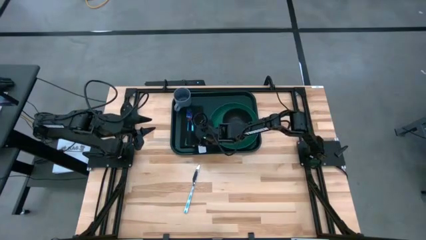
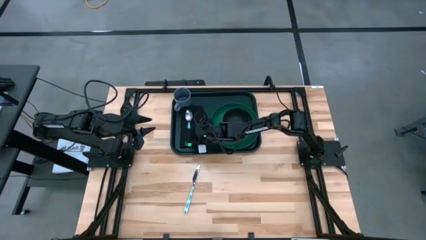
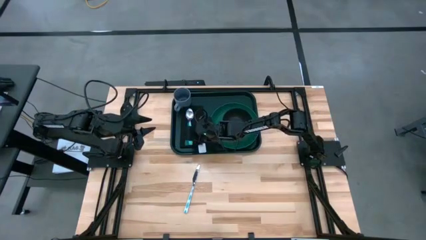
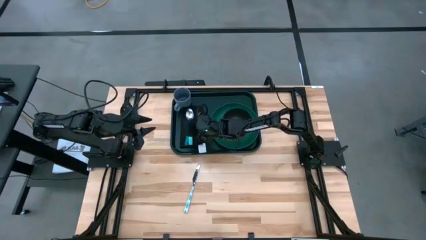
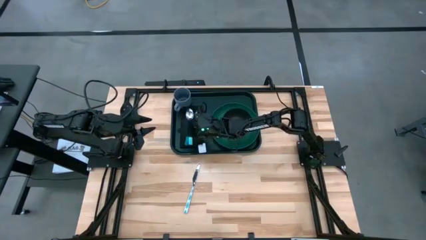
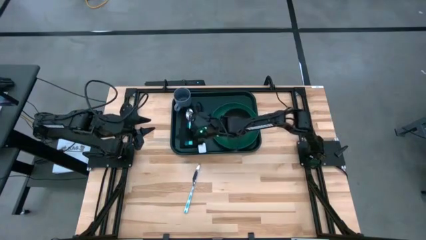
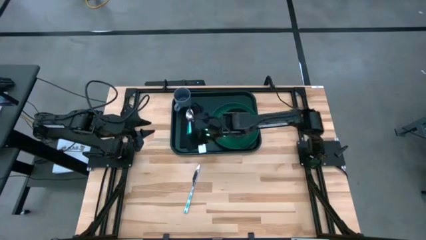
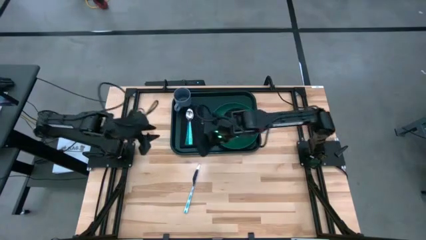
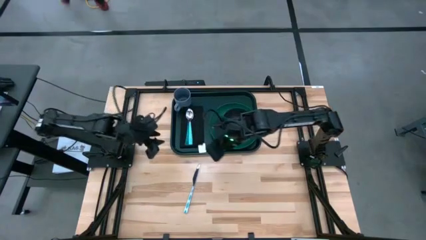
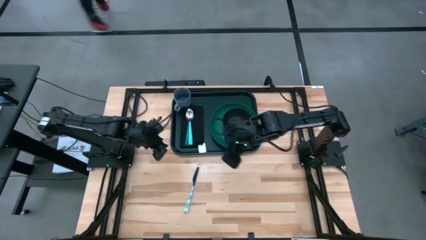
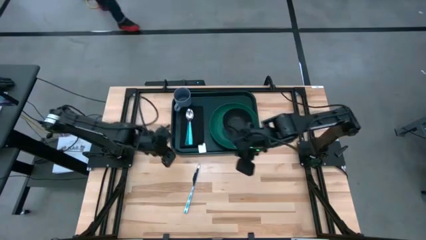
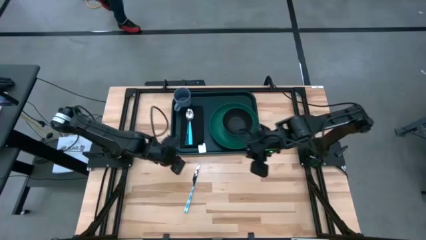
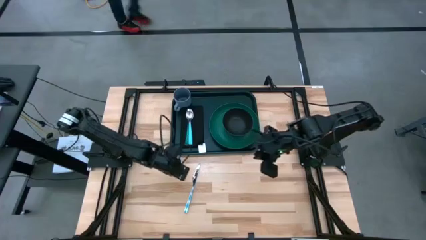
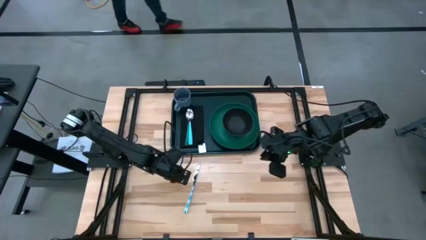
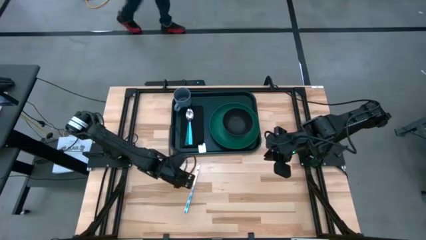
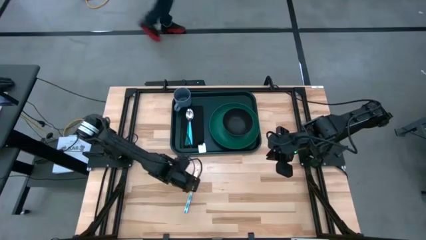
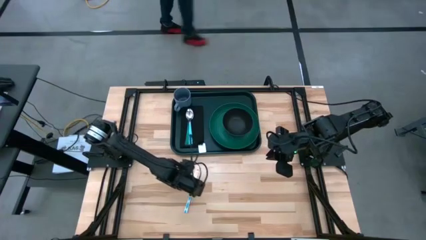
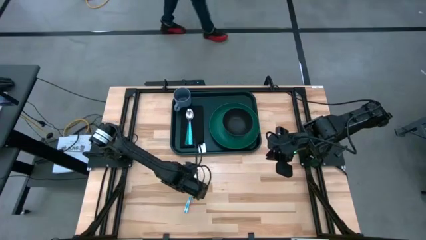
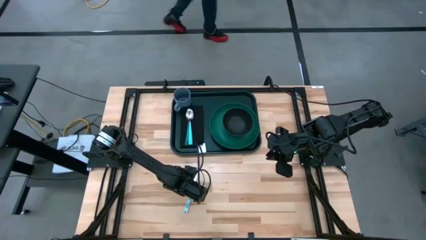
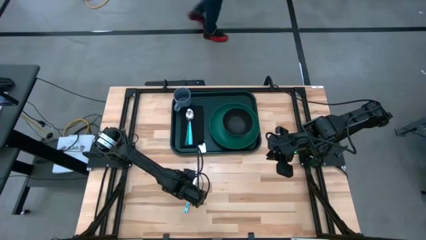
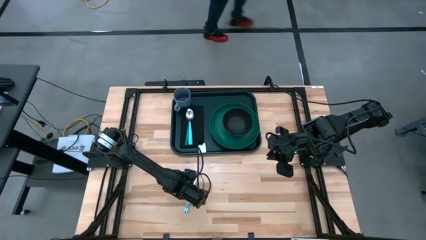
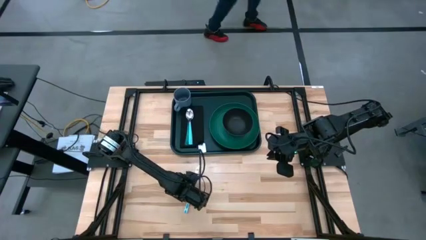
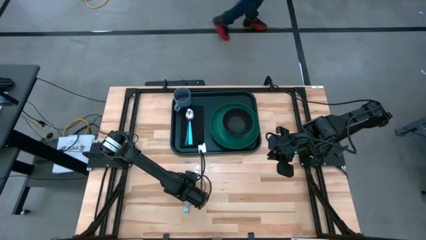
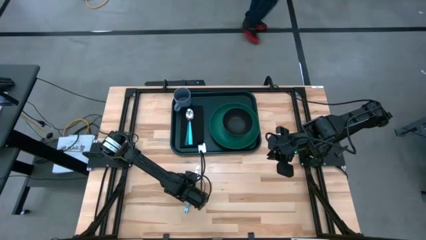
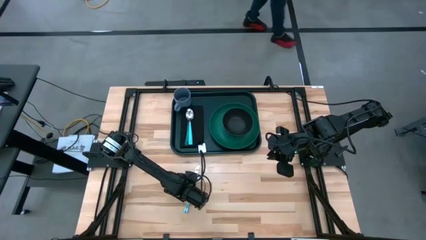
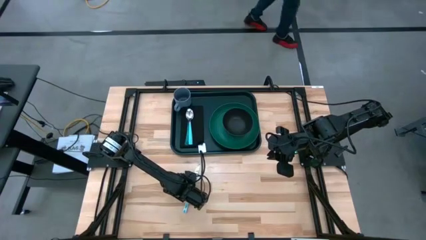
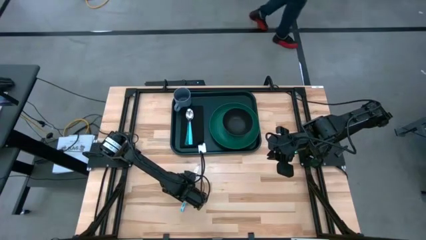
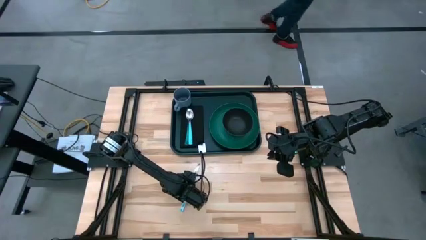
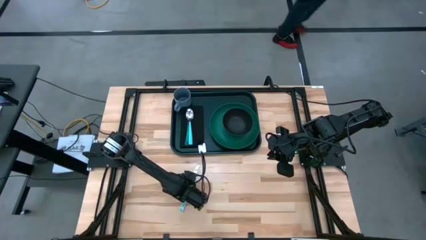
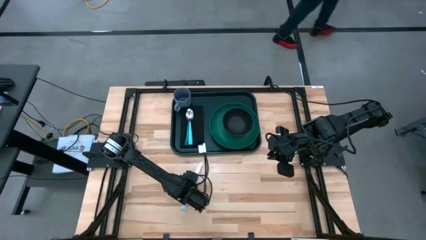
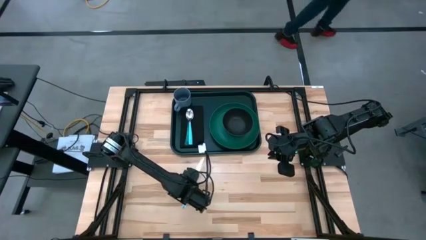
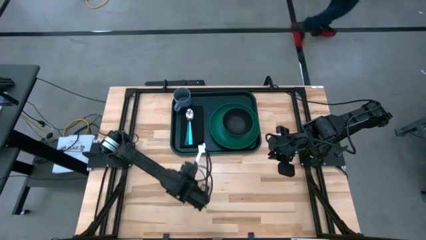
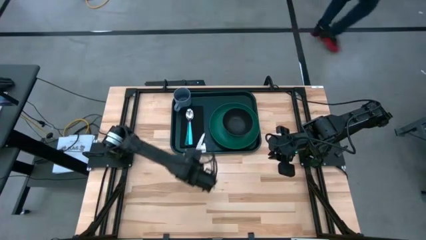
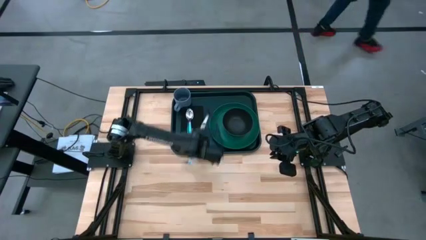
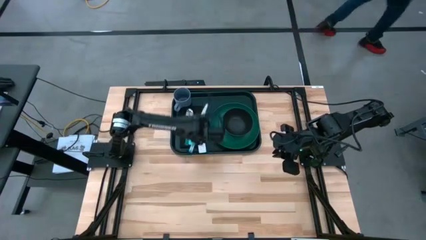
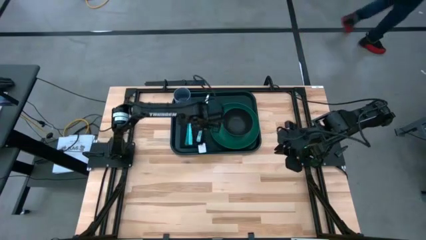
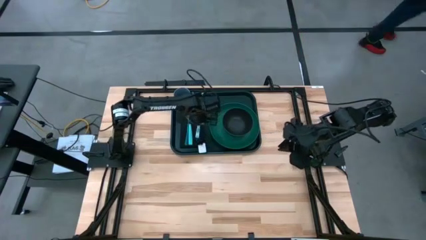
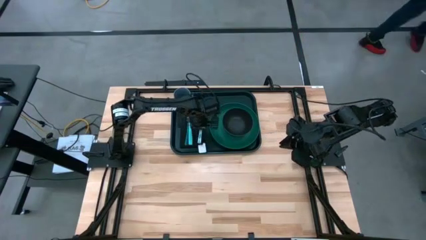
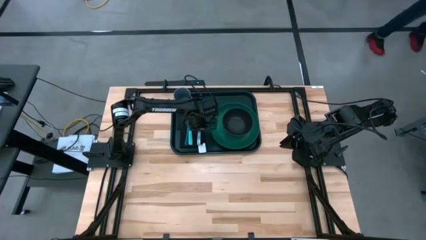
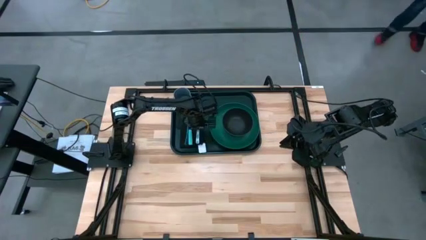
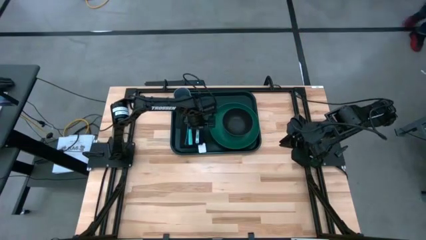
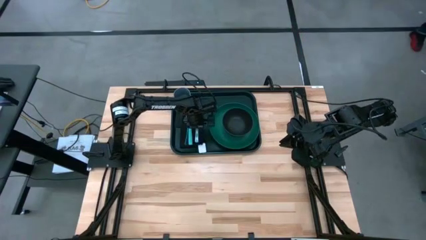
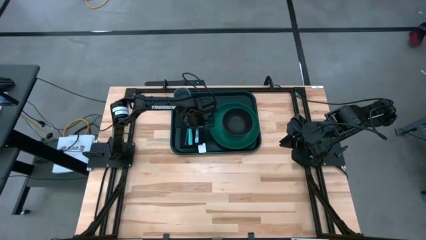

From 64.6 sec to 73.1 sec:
Task: Set up tray
Put the blue knife to the right of the blue spoon on the black napkin

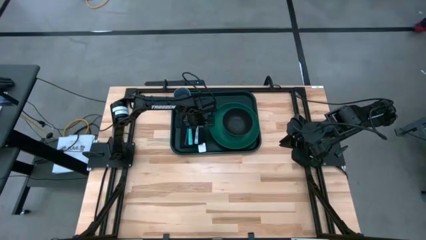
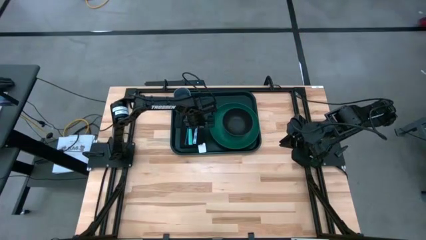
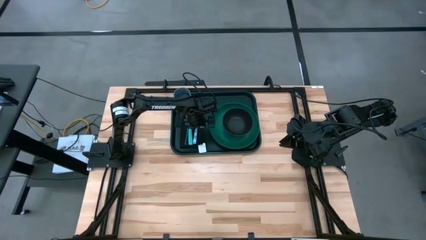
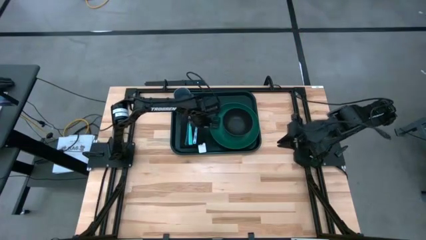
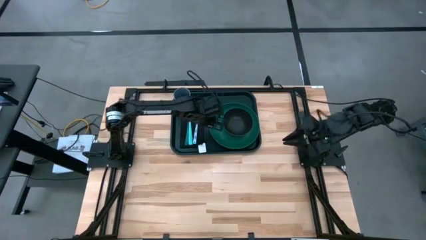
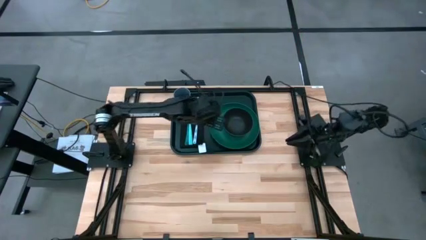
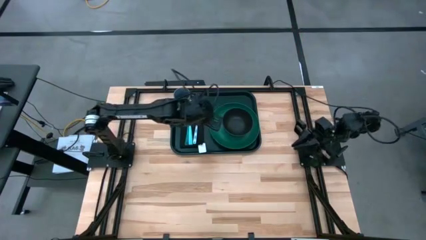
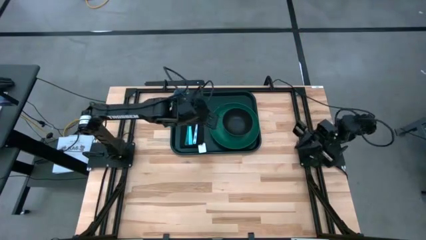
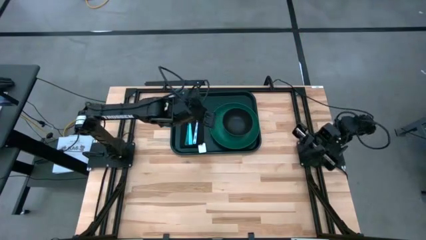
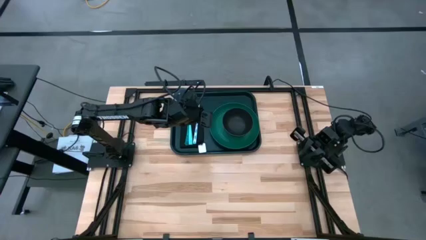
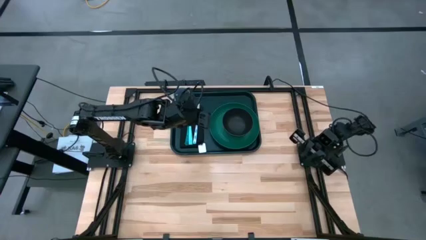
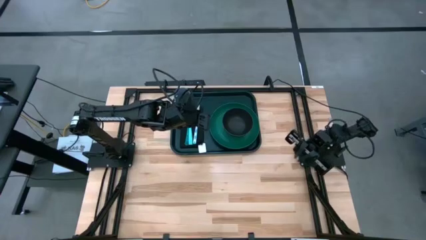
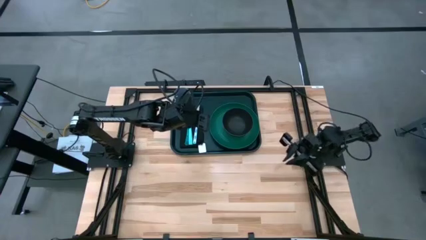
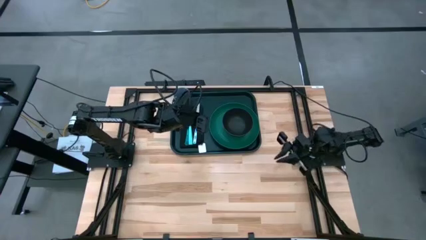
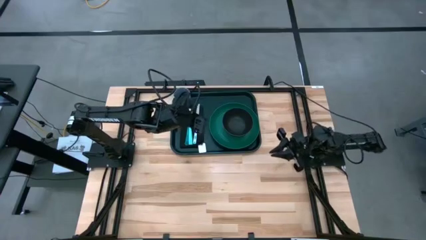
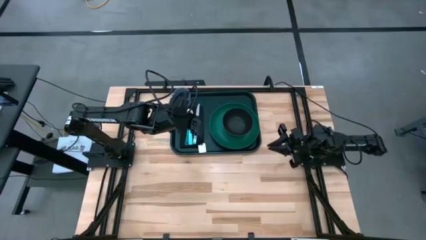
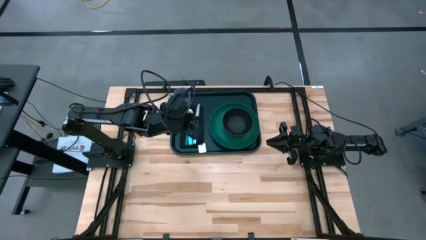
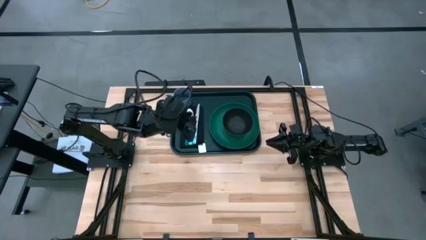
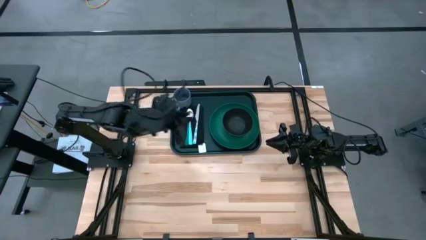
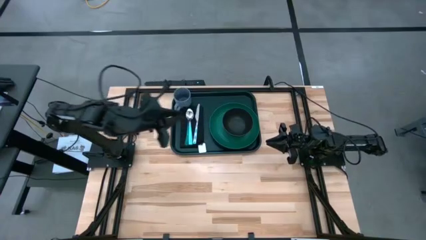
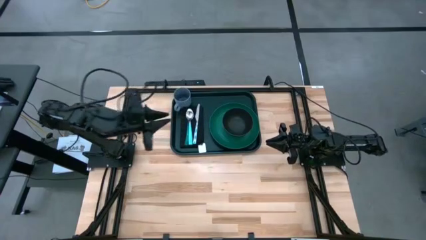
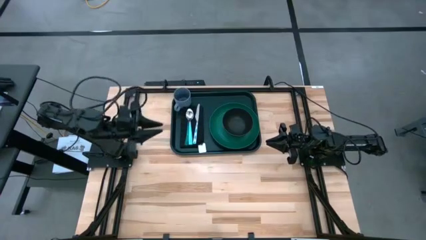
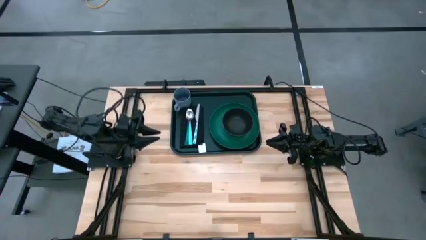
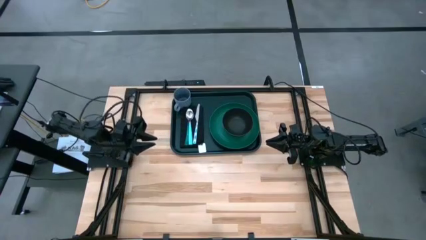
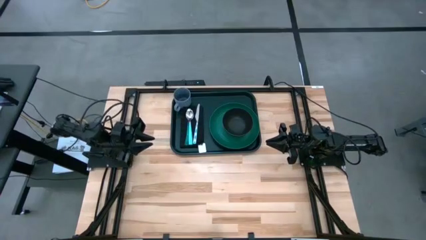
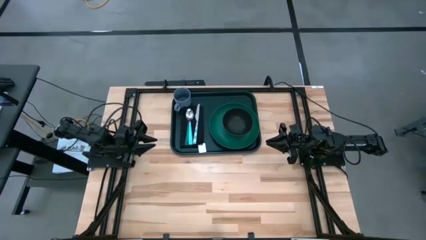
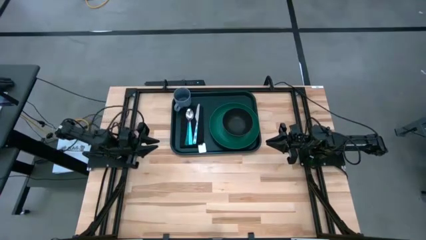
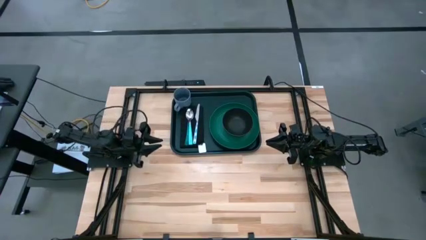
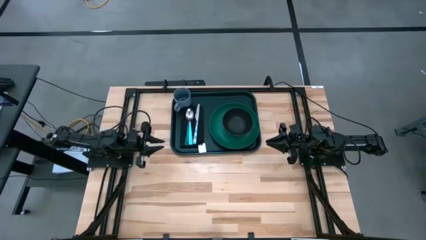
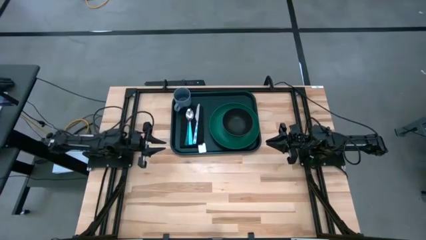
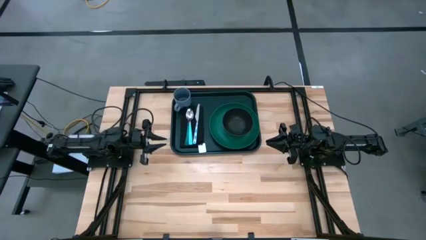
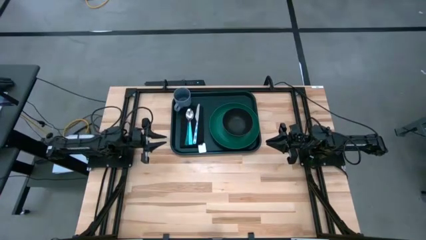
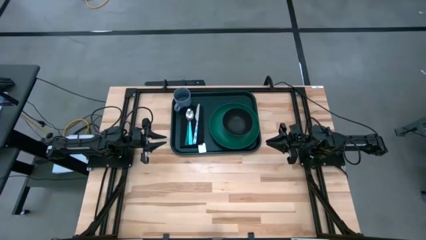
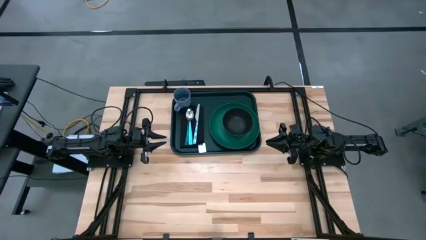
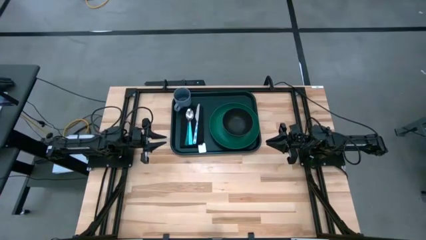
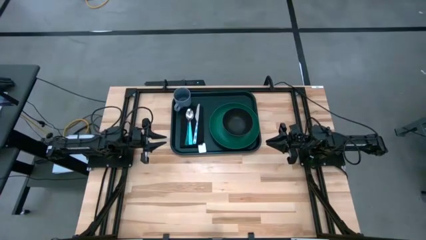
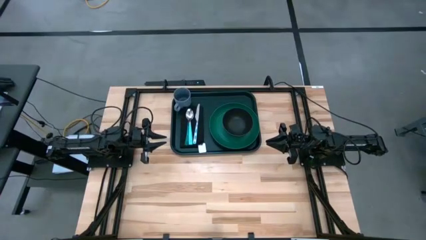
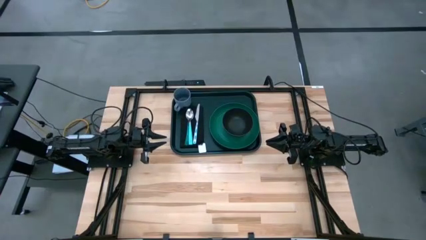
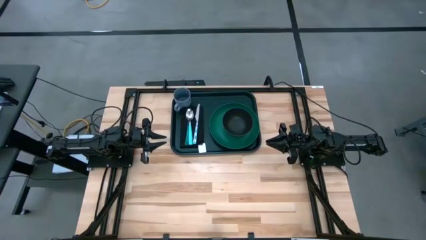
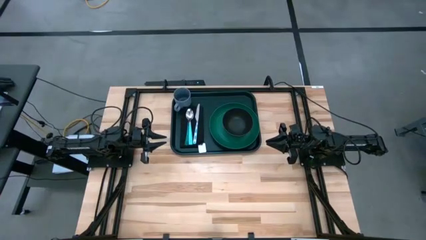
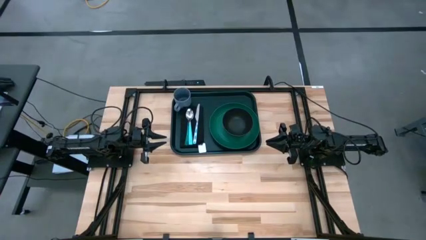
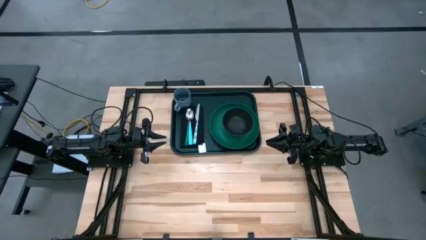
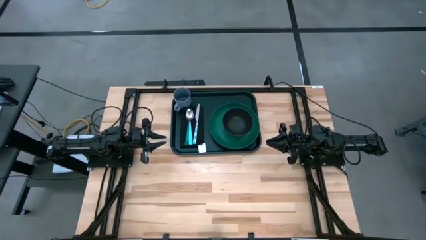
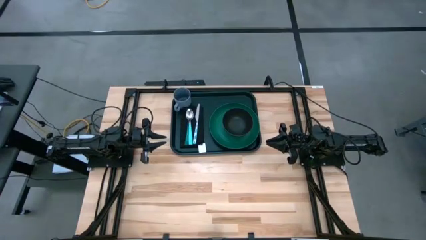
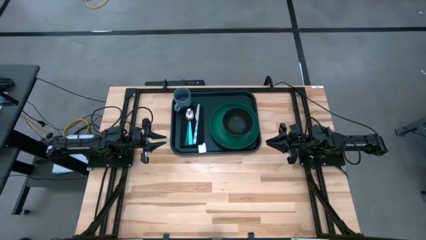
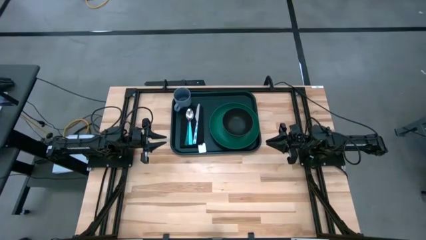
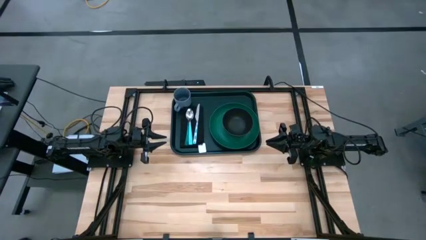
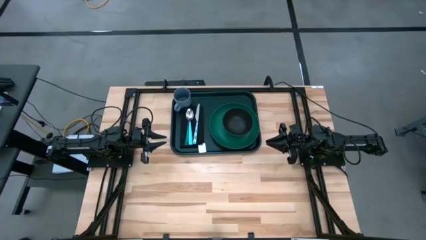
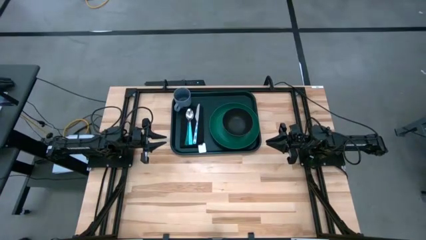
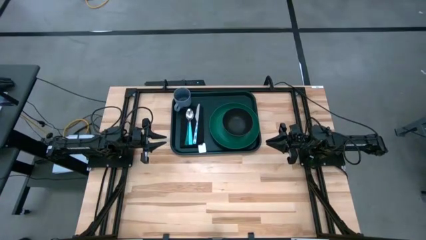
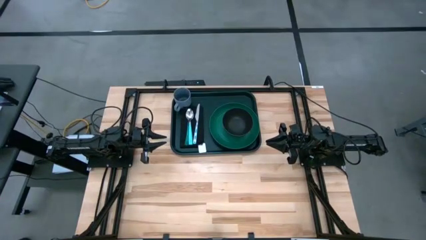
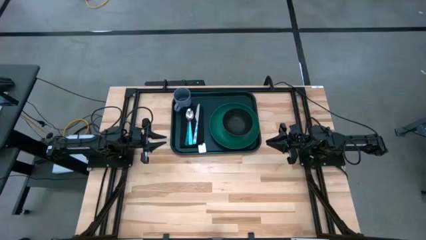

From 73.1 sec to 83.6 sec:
Return to Home Position
